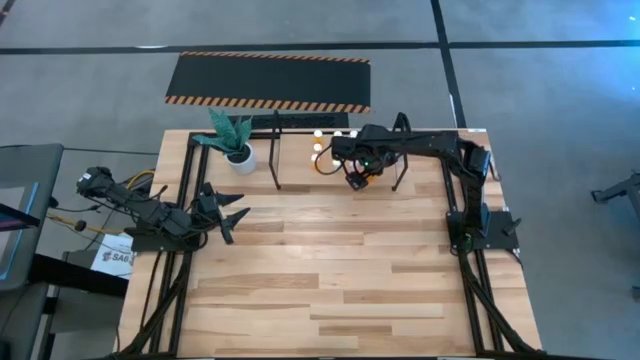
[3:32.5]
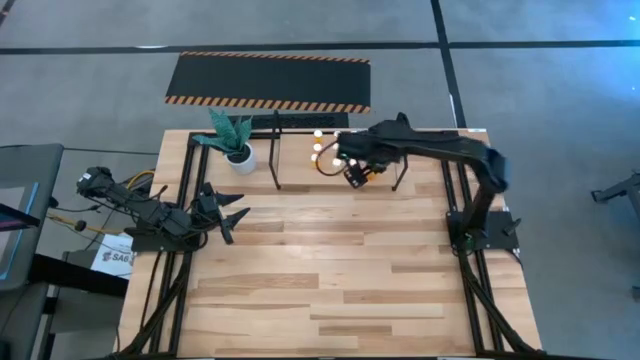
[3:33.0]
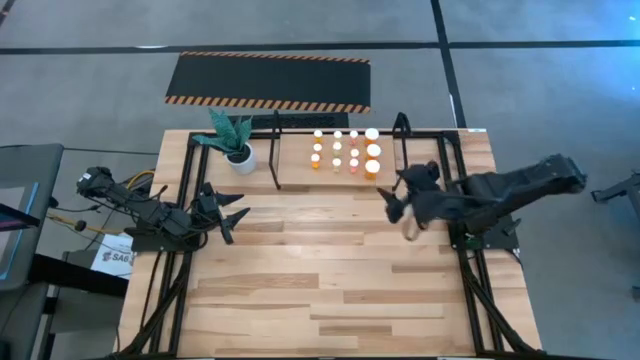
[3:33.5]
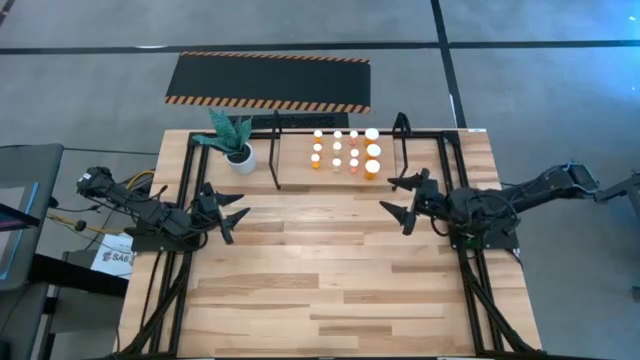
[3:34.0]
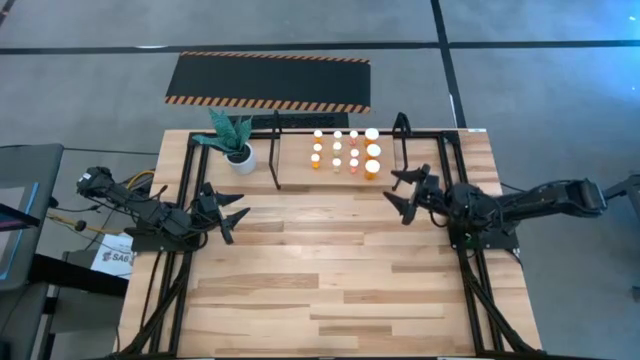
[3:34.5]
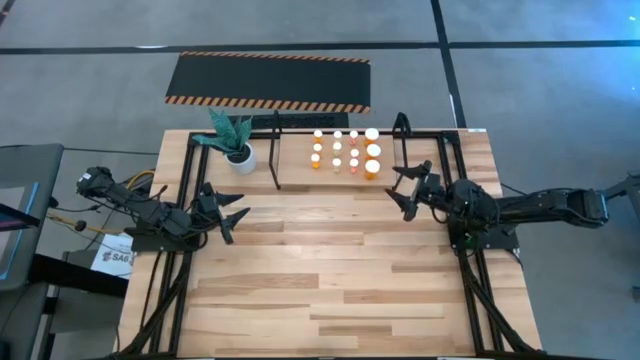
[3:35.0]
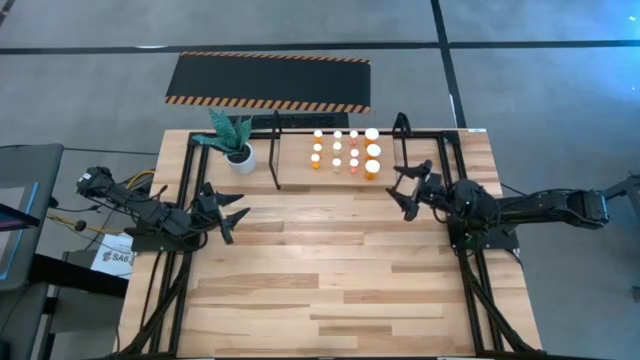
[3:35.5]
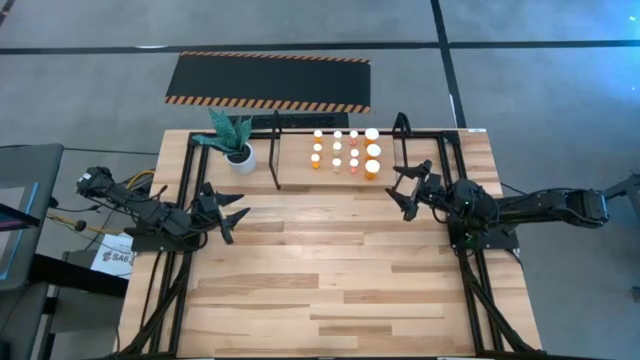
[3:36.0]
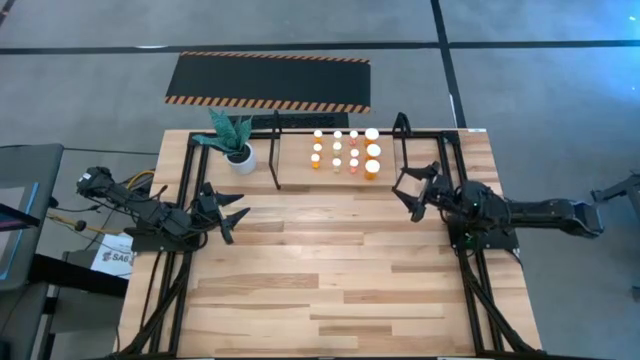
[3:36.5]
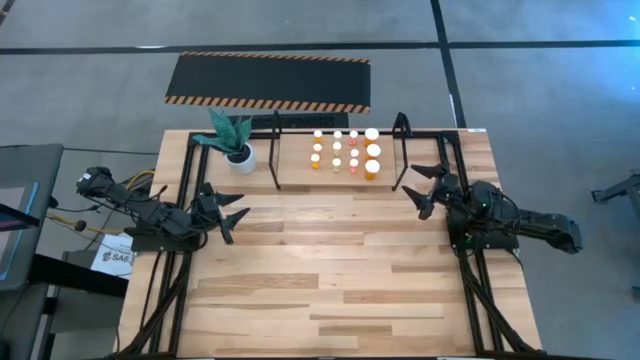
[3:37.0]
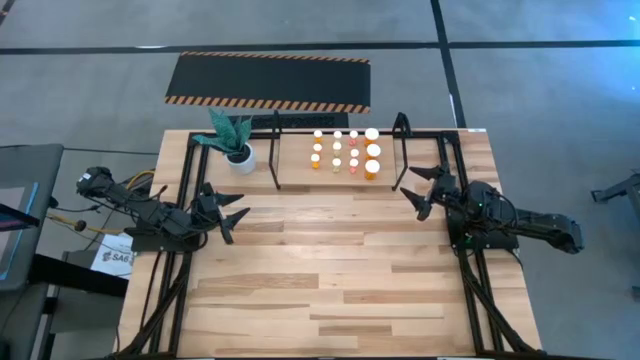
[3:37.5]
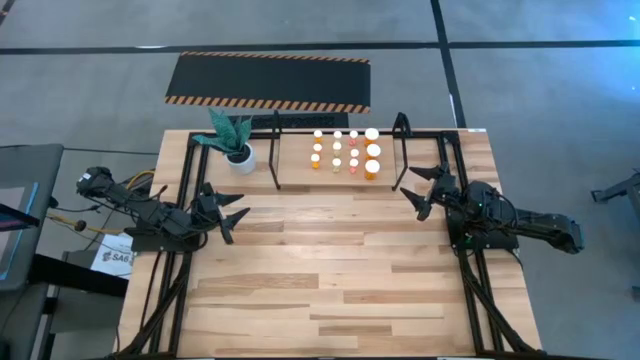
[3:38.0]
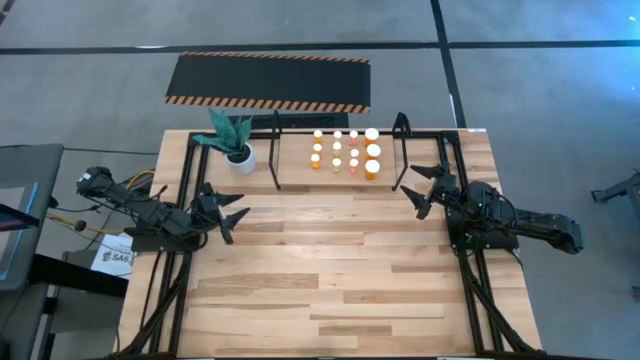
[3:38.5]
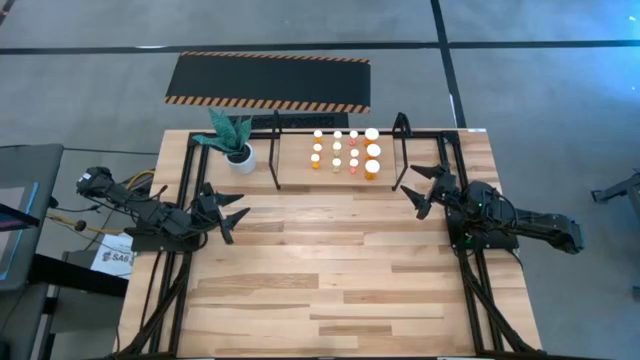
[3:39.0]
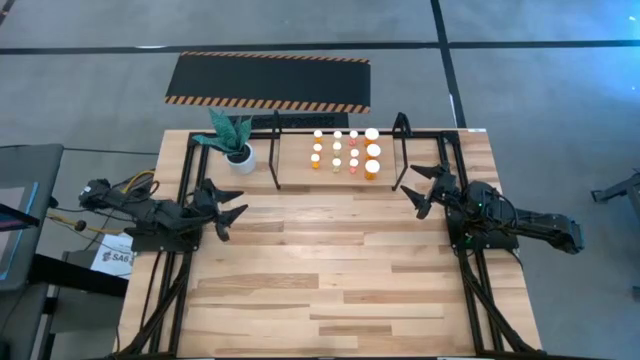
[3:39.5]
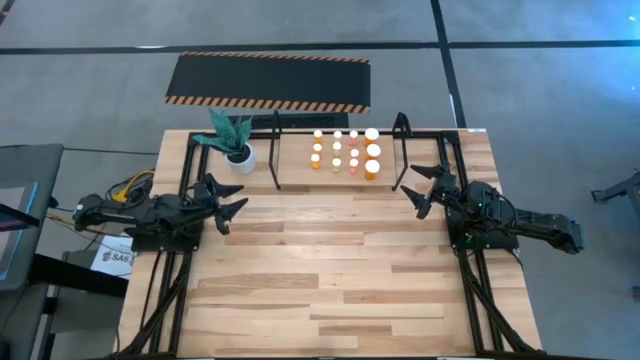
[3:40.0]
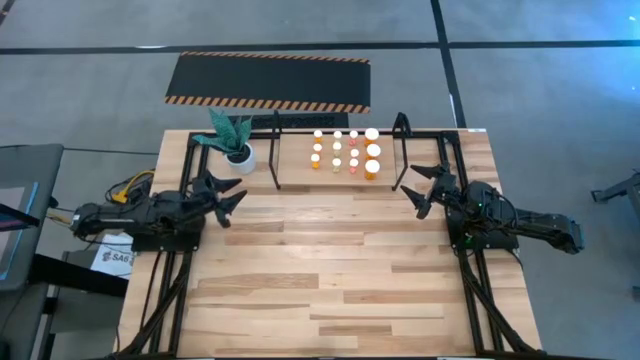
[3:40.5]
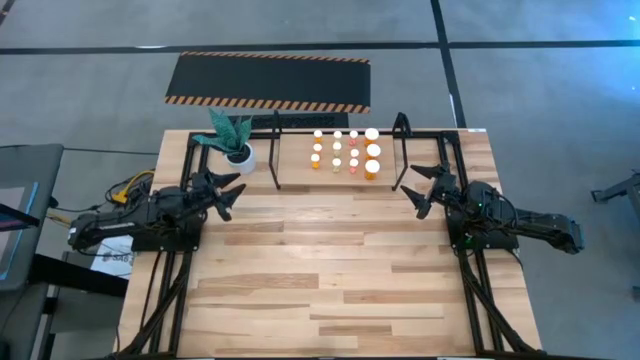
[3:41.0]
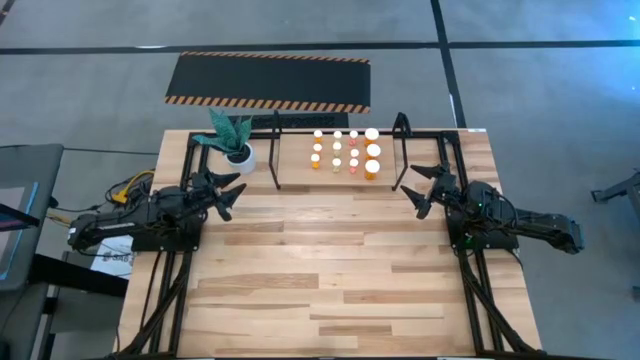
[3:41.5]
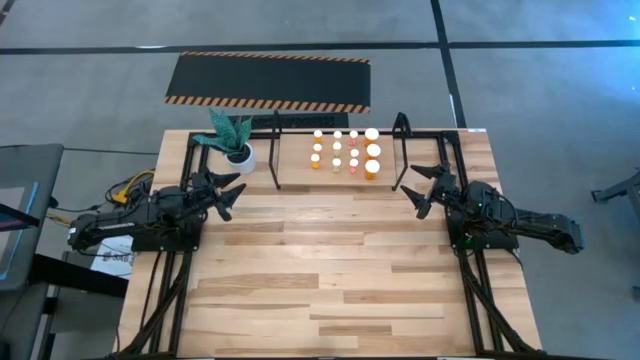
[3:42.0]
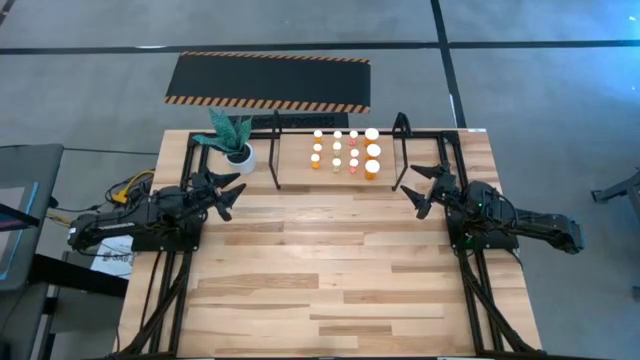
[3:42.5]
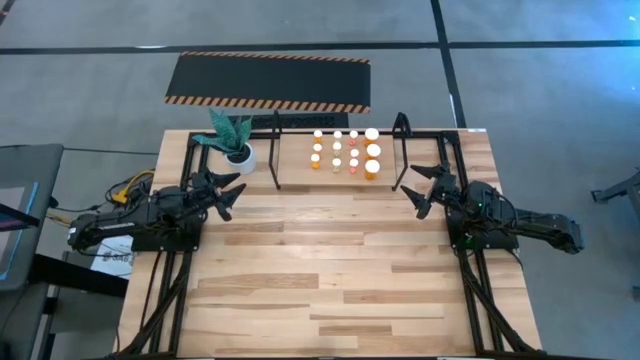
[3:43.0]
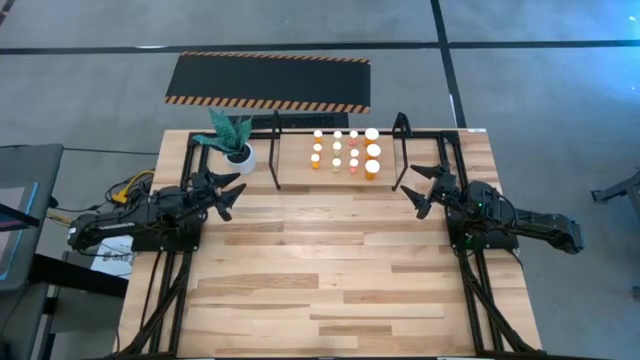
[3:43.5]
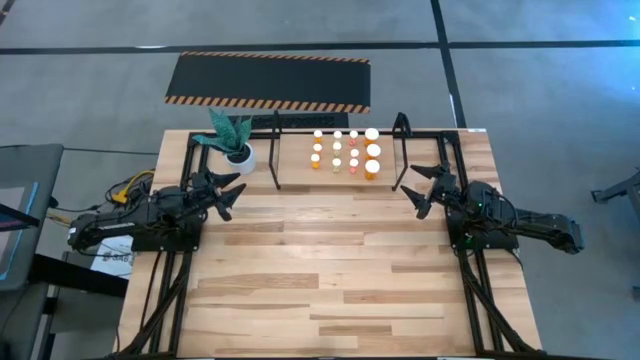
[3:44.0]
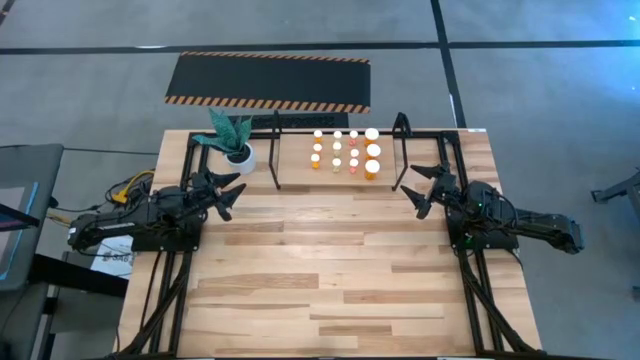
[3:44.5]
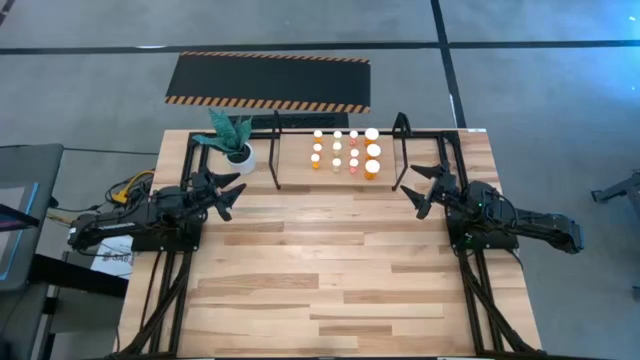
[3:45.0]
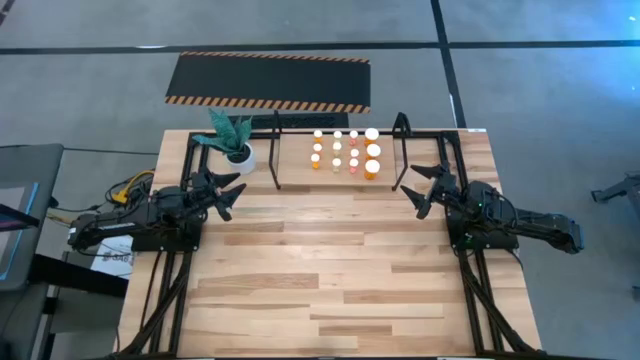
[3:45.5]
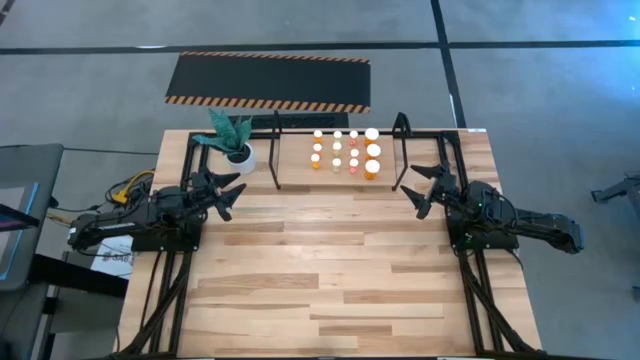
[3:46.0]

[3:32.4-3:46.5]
Task: Pick and place medicine bottles onto shelf by color
Return to Home Position

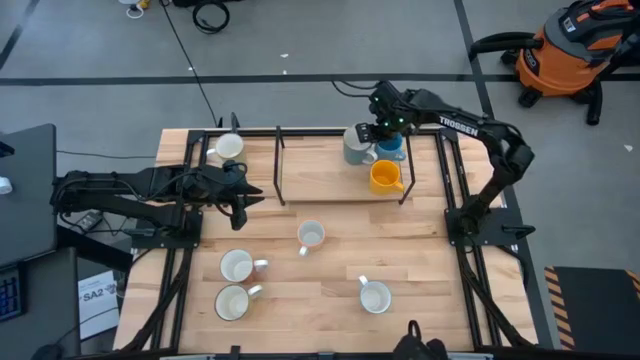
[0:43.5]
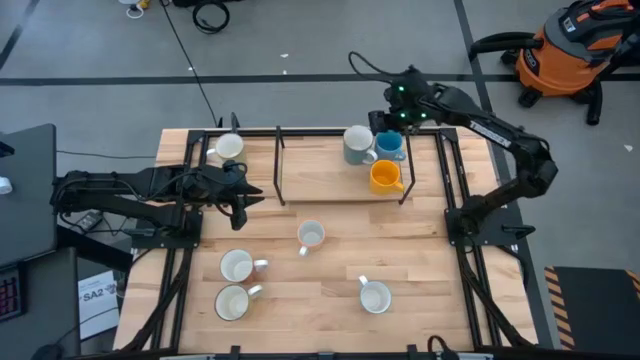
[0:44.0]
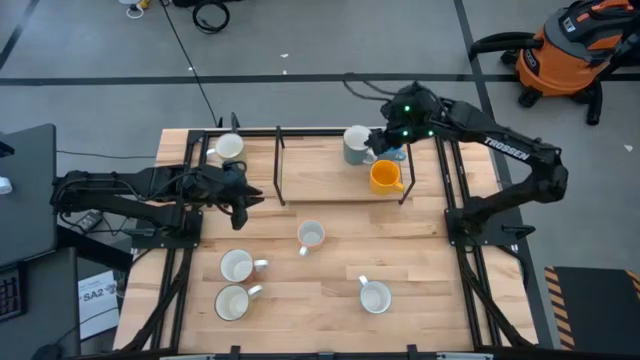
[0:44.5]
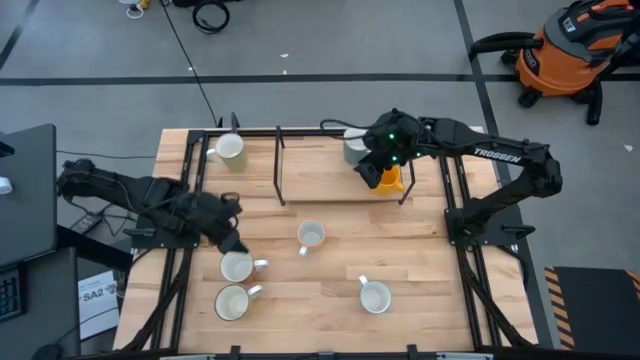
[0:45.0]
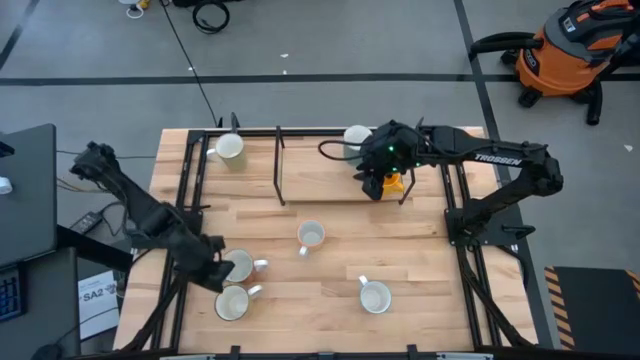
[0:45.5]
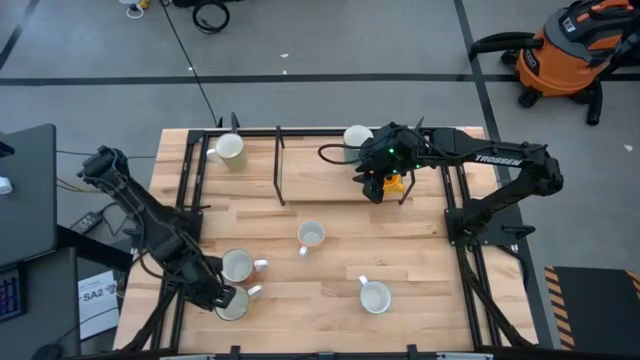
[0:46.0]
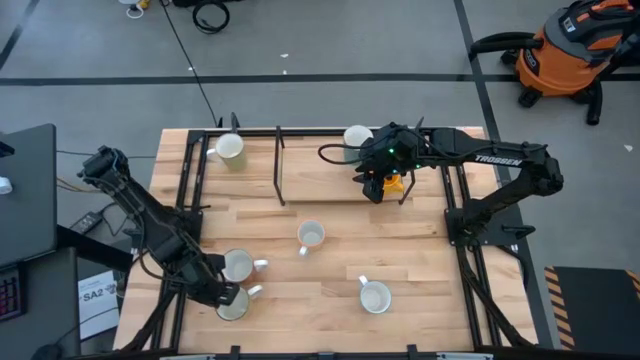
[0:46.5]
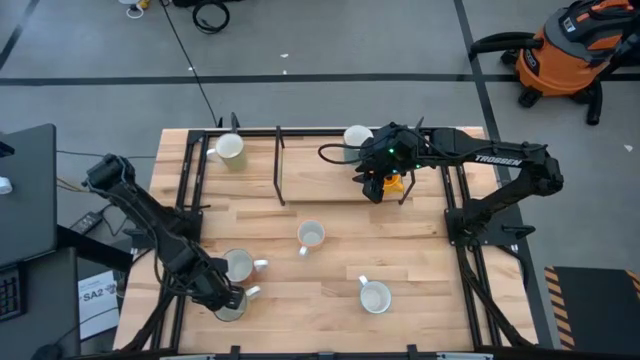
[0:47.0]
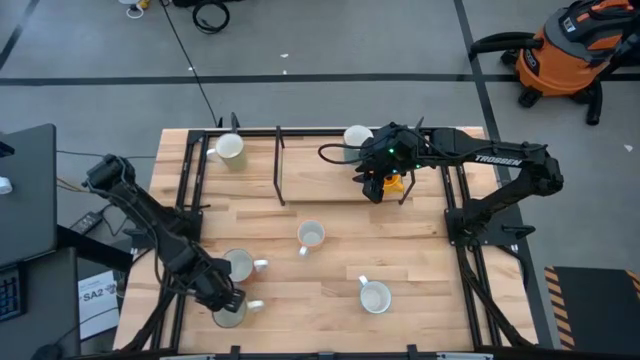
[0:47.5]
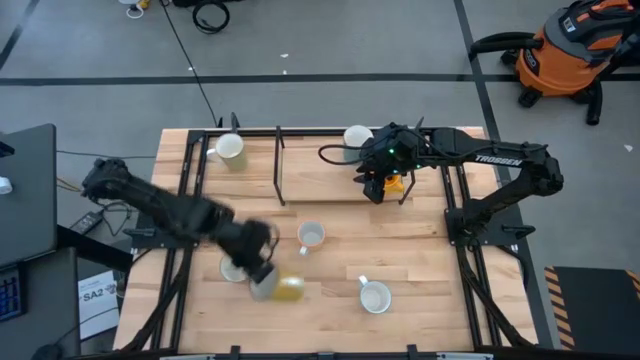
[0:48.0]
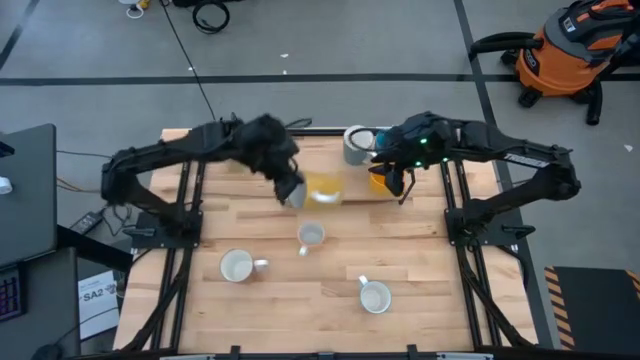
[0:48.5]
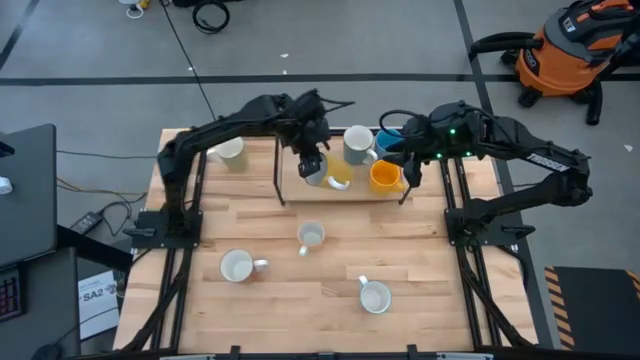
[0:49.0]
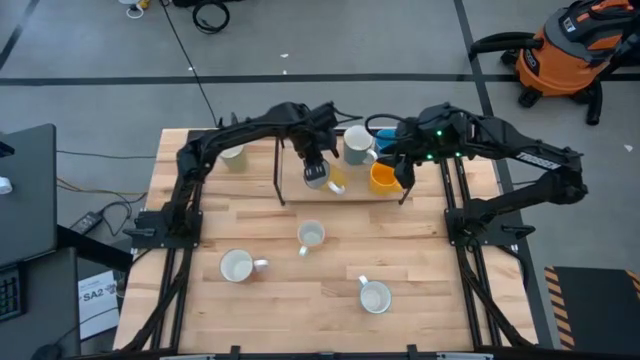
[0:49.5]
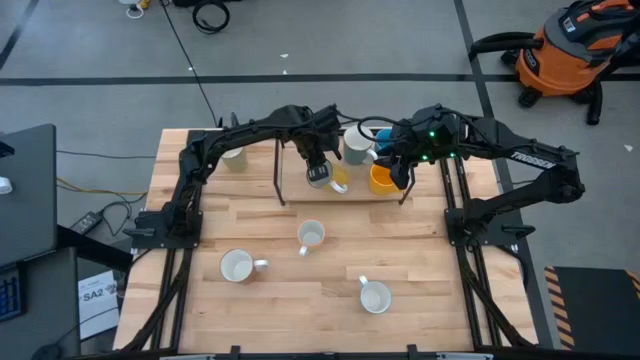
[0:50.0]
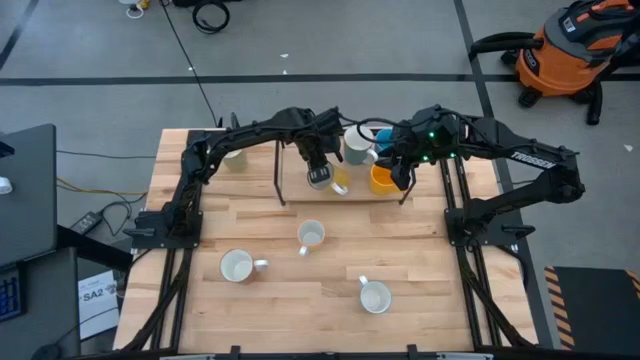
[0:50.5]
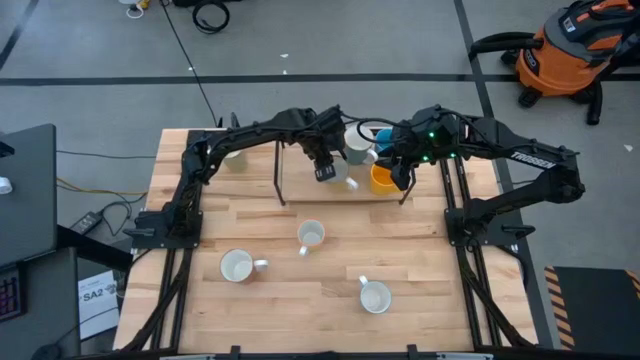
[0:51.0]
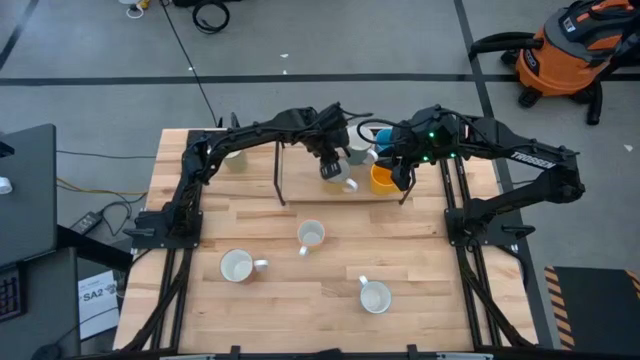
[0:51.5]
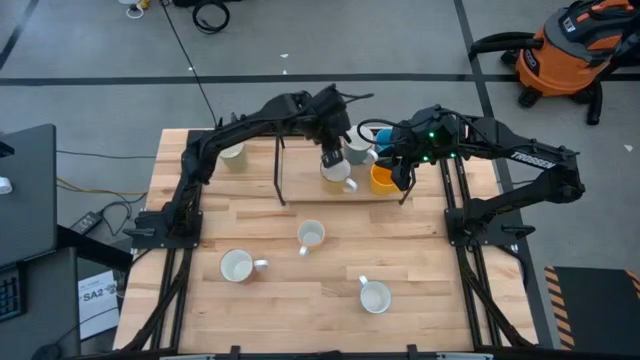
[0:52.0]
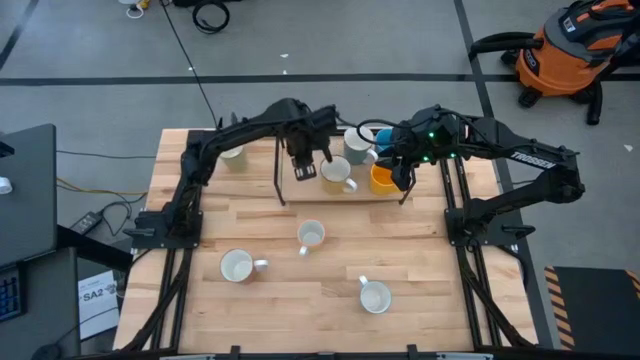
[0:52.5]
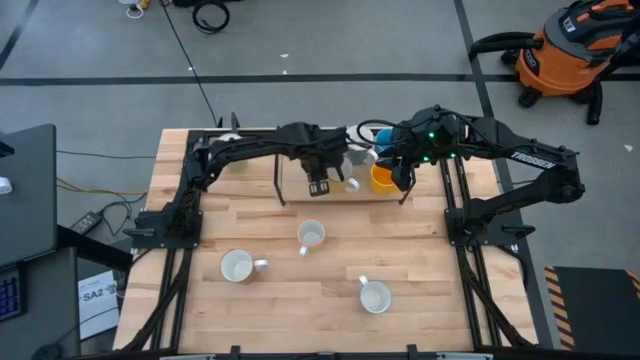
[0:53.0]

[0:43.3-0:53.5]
Task: Place coffee mugs
Put the light yellow mug on the shelf
